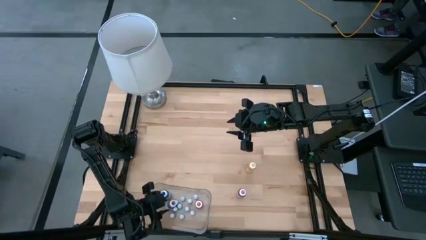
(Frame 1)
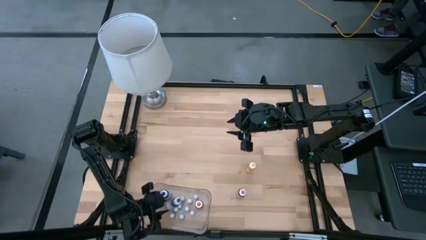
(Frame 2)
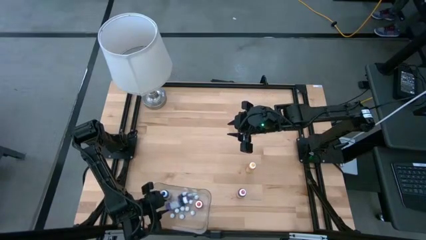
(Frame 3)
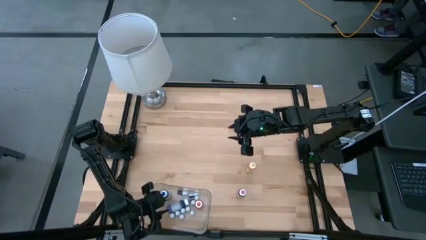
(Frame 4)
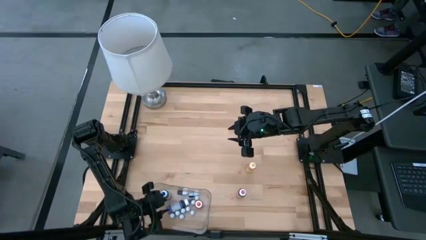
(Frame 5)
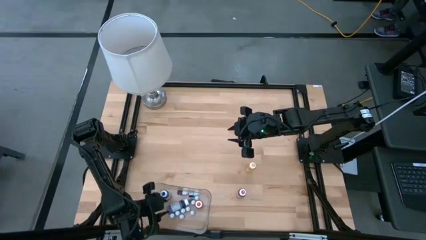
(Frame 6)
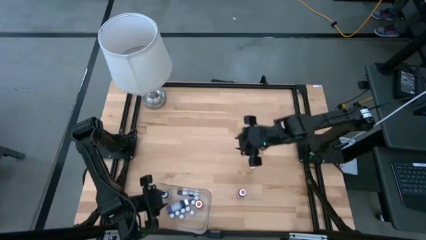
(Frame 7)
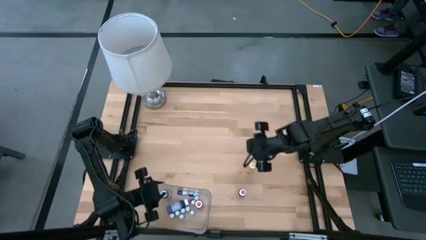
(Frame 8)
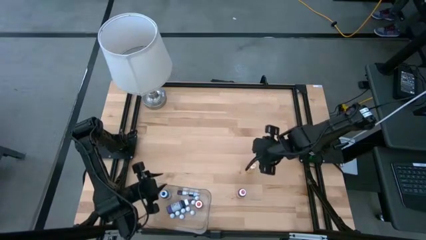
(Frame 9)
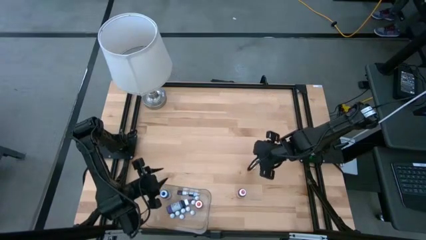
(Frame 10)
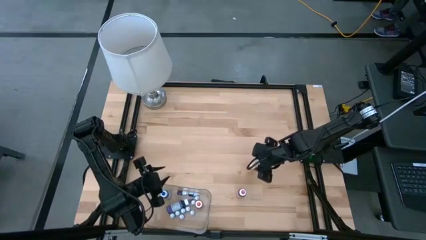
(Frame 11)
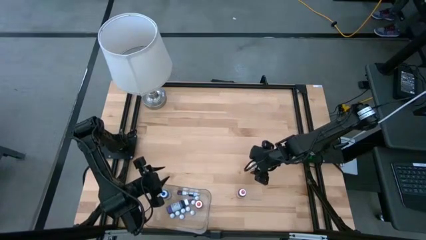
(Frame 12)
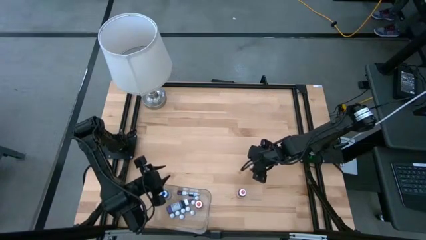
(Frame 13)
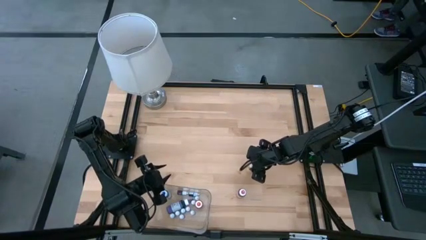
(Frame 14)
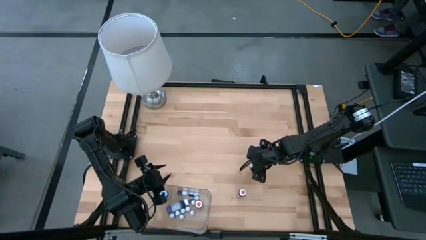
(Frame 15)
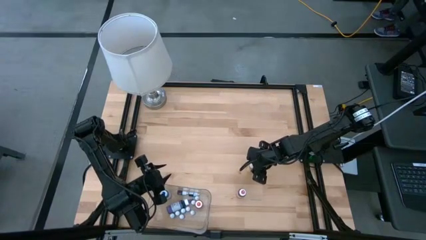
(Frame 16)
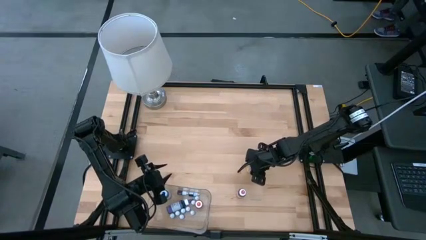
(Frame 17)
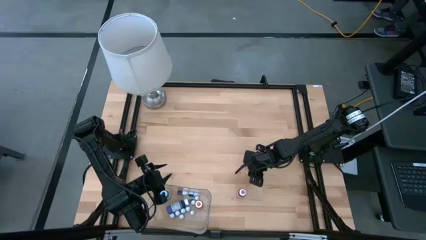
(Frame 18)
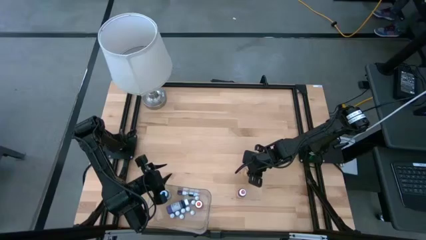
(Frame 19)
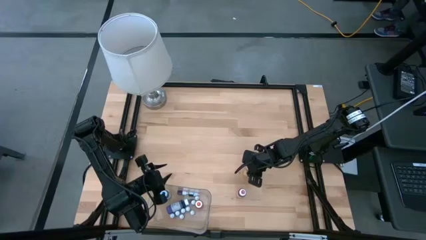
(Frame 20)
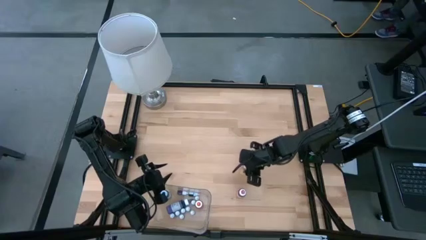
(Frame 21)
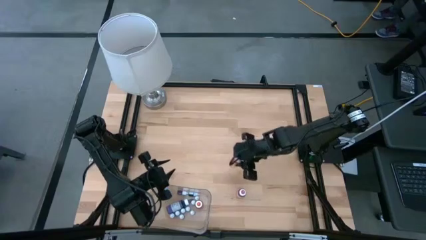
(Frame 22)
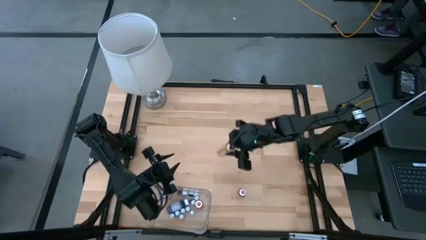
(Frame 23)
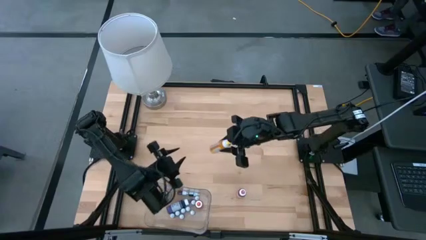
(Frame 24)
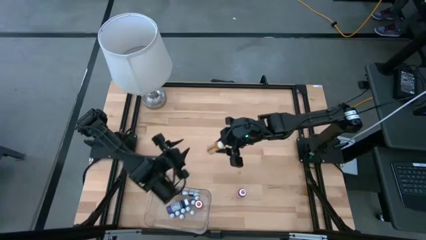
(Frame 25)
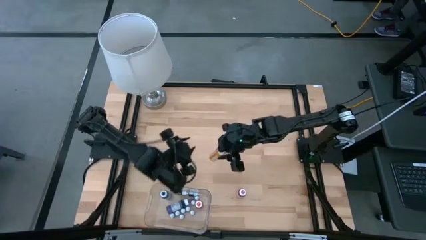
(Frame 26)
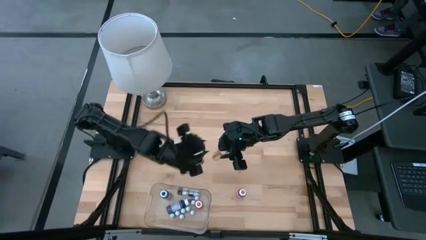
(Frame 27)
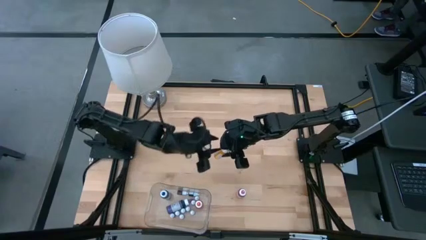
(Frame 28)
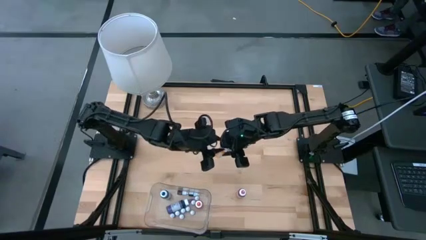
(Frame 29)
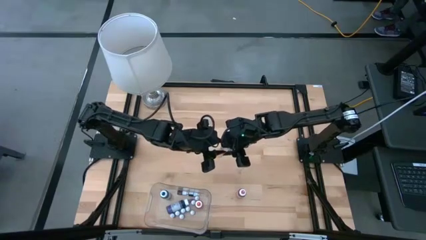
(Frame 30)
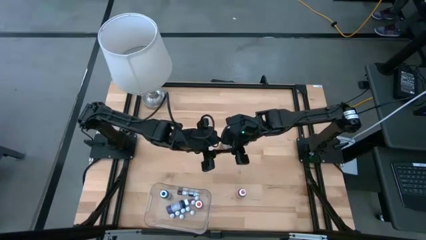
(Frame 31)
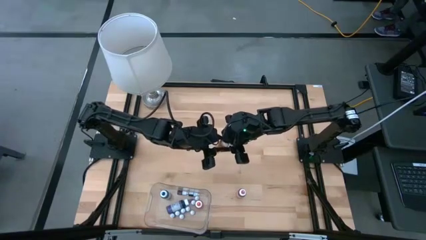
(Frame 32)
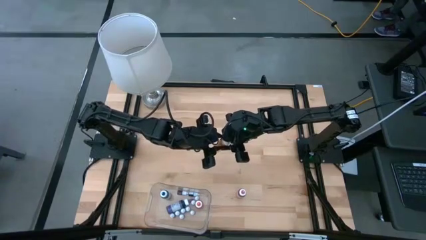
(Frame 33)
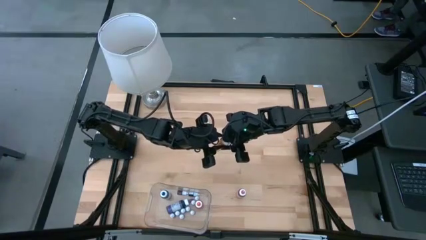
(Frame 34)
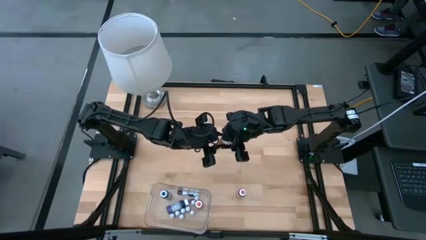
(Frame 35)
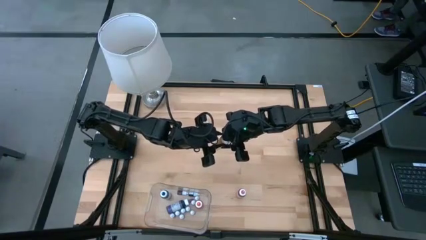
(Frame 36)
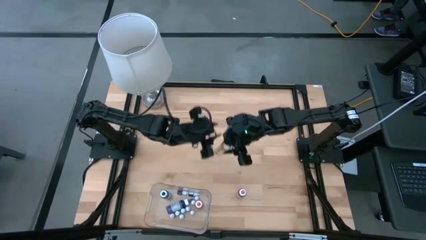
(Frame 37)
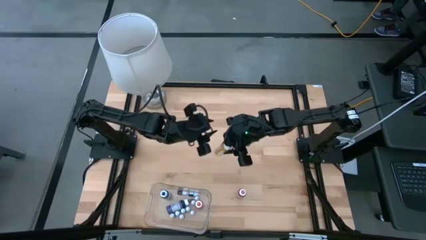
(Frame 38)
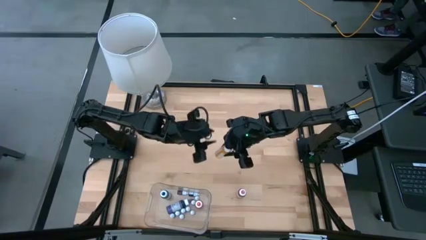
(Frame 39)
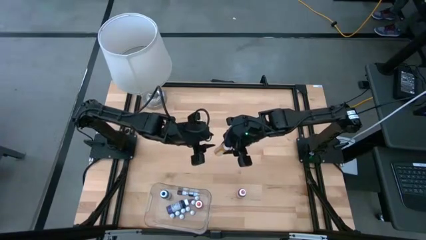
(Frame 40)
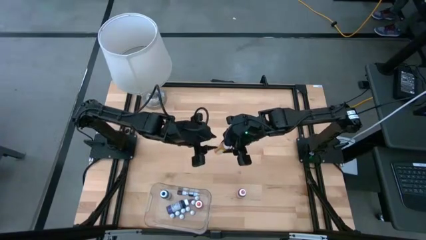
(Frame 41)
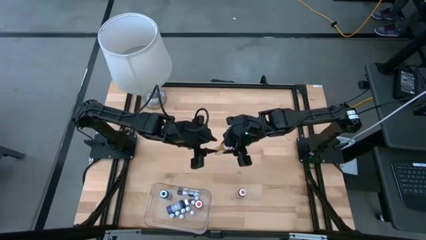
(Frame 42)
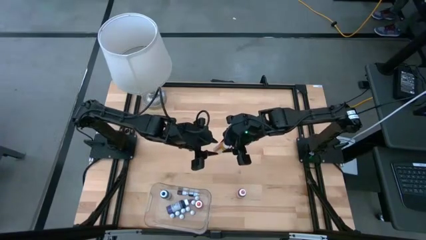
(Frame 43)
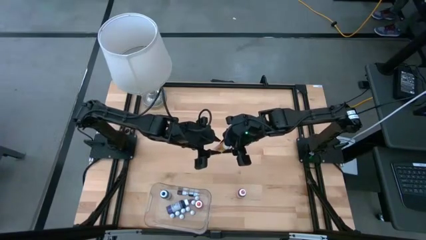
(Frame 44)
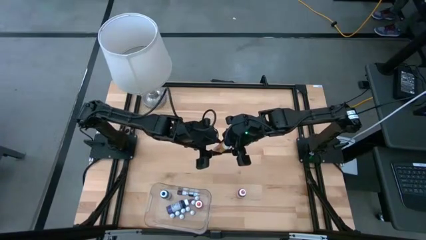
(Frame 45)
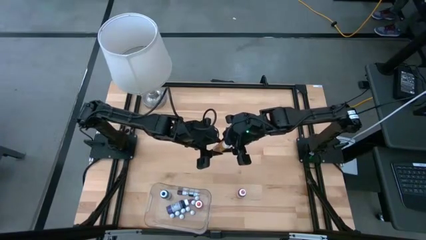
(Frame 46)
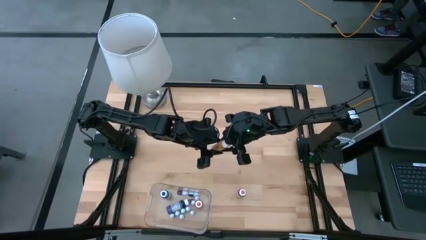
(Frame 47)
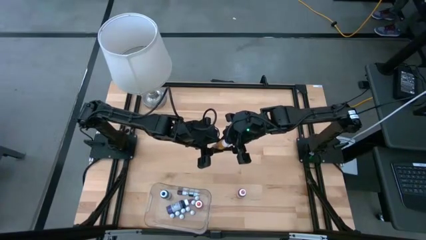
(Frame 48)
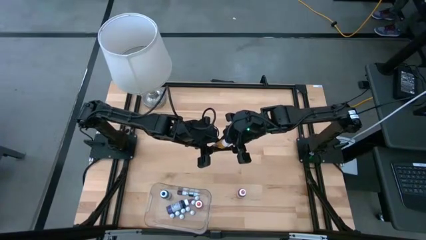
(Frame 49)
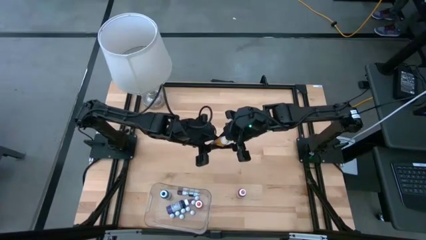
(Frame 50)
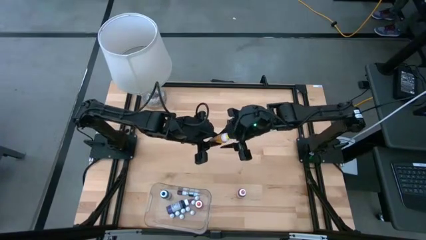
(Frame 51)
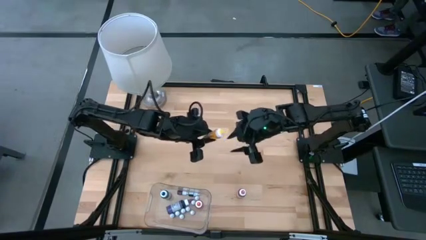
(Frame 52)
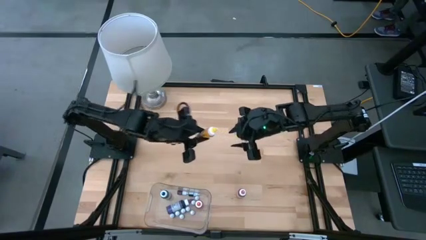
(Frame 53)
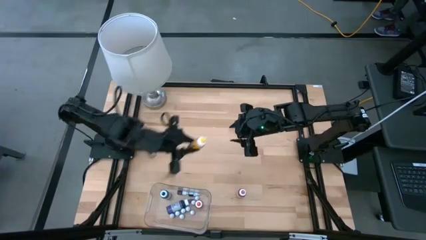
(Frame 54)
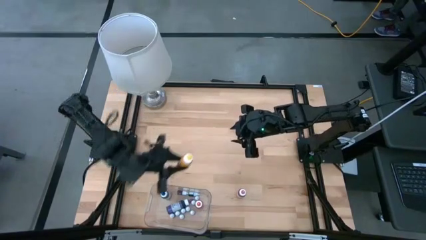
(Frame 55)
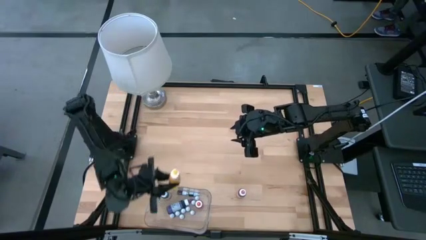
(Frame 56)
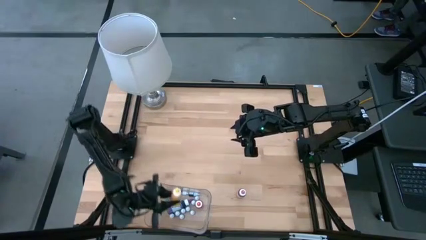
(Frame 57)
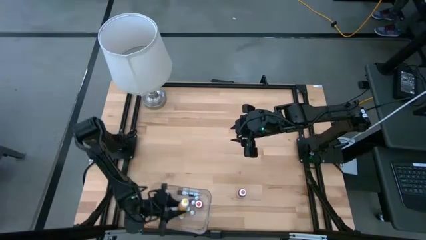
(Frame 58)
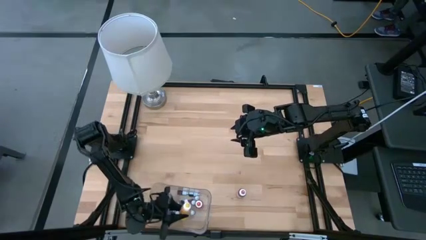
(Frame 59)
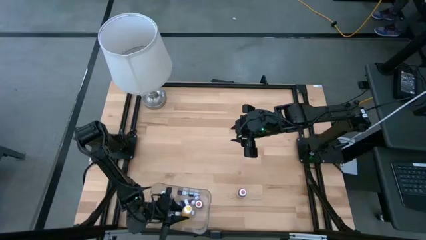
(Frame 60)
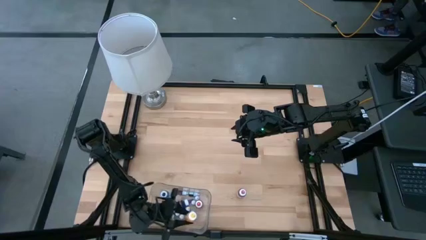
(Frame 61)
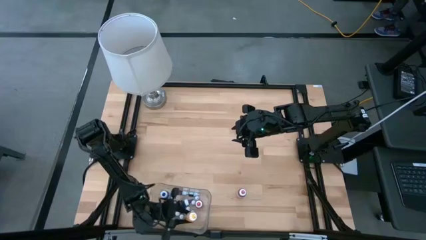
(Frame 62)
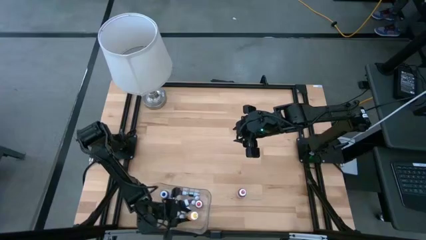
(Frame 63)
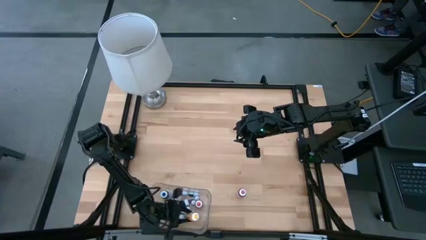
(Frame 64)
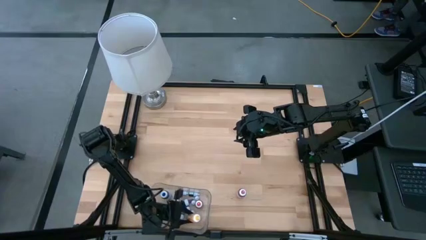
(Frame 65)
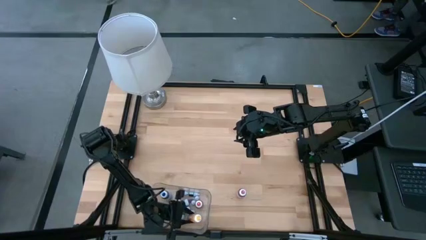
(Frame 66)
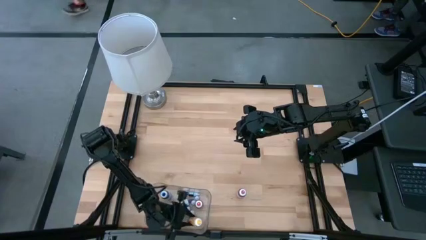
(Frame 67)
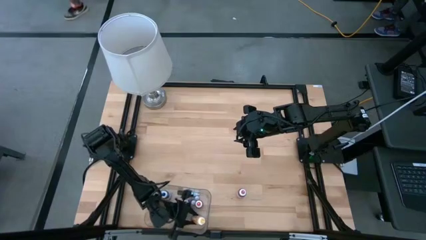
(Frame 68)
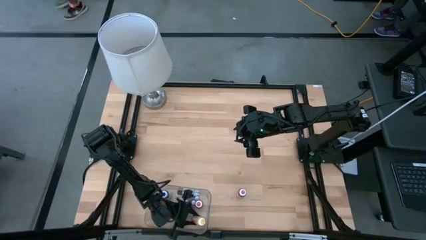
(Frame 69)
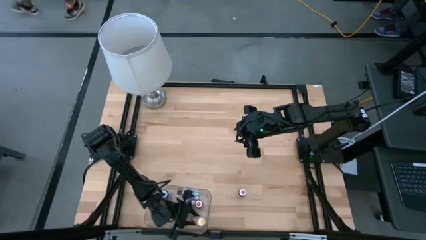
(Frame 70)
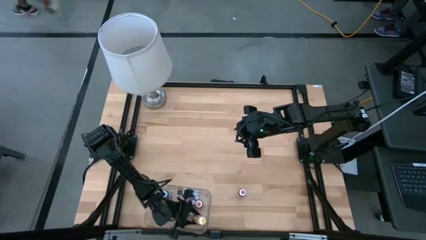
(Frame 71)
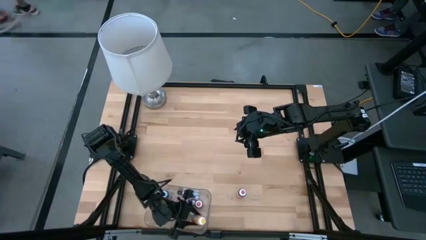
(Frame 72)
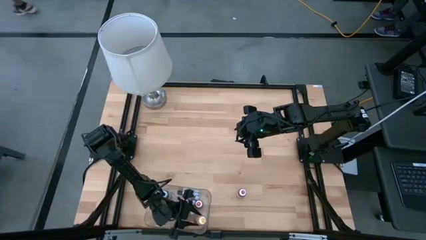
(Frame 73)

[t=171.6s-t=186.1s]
Task: Pick & Place food coloring
Put the large yellow food coloring bottle into the bin

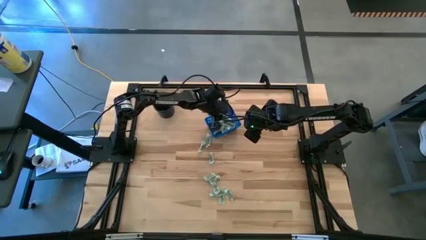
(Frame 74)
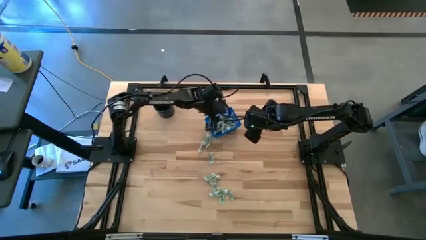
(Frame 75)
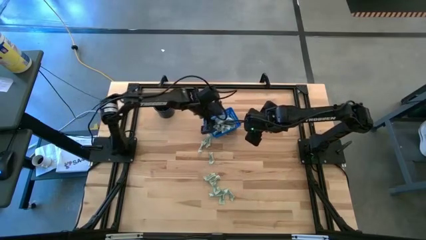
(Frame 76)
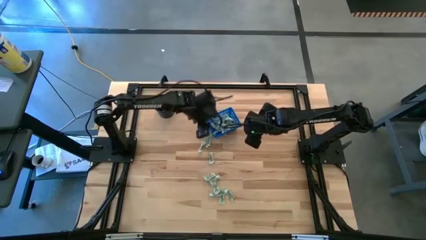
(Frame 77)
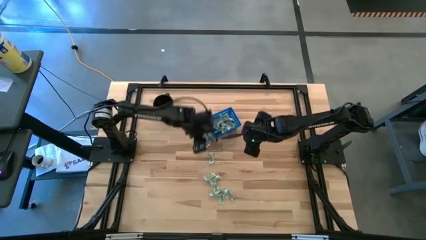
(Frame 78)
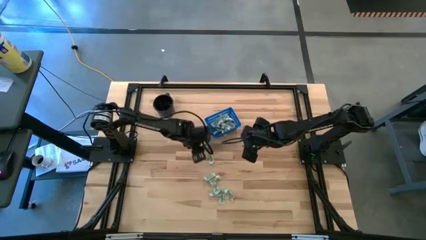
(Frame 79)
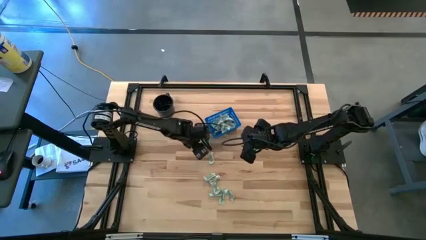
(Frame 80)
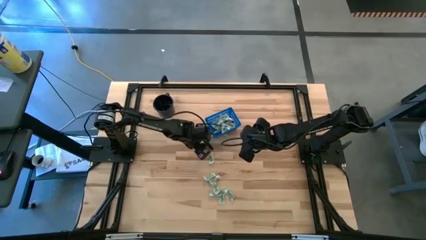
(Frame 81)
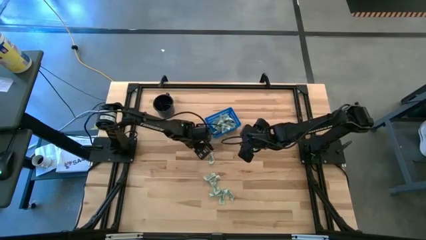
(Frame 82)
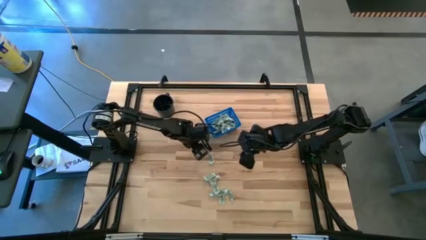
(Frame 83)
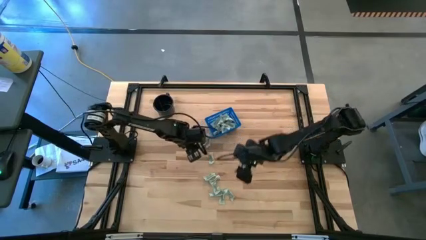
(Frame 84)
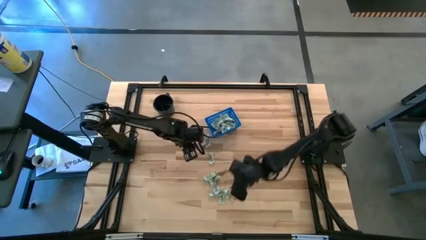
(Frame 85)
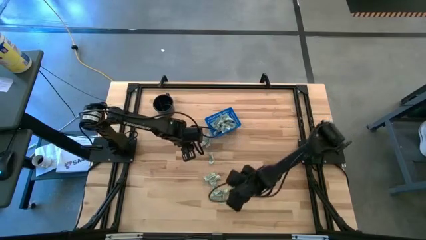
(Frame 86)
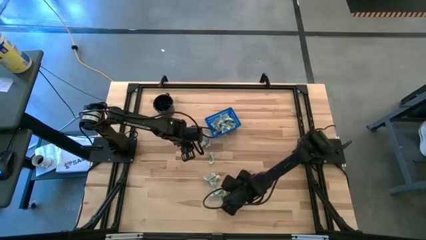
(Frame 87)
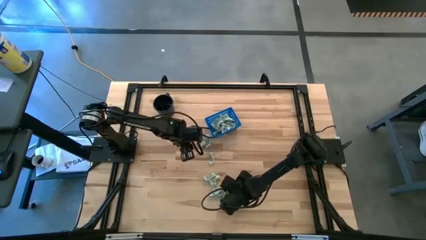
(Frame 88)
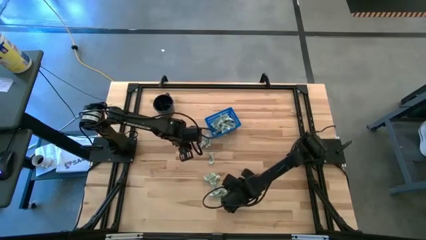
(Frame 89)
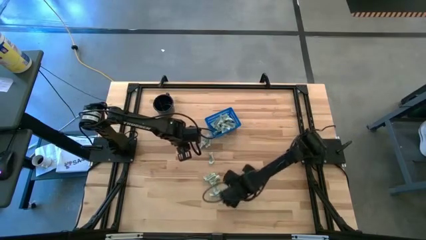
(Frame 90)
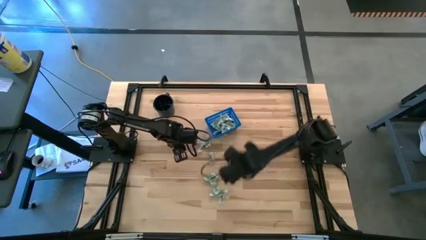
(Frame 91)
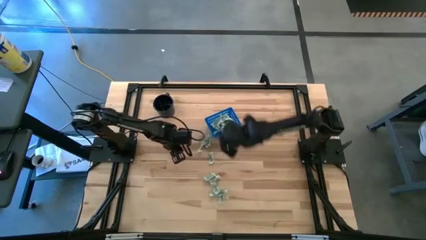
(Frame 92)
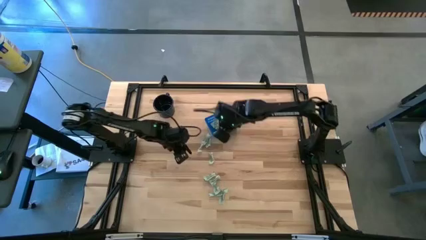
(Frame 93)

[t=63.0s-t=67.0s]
Task: Pick and place Stevia / Truvia into bins
Put the green stevia packet into the blue bin
